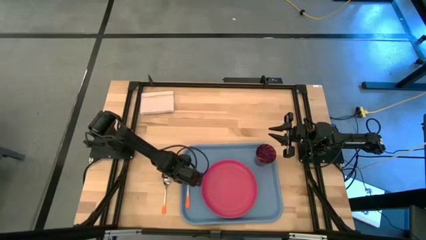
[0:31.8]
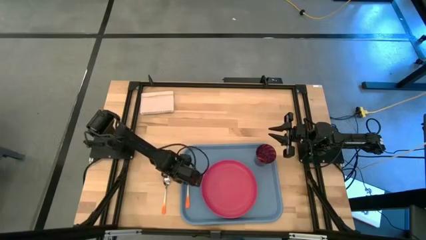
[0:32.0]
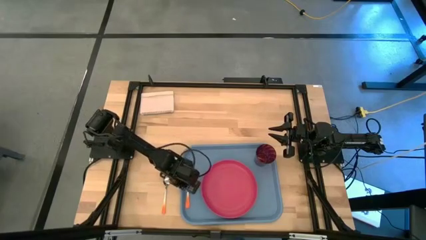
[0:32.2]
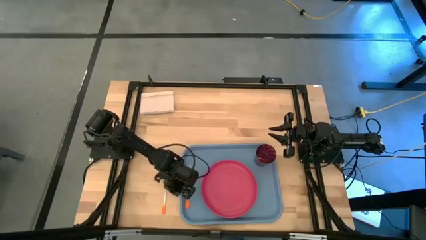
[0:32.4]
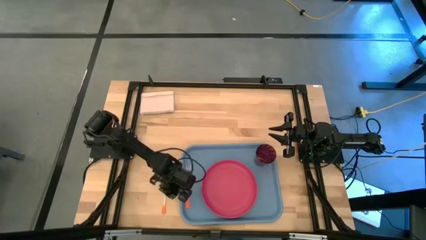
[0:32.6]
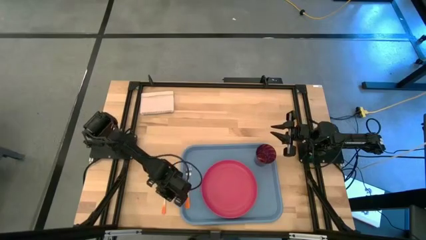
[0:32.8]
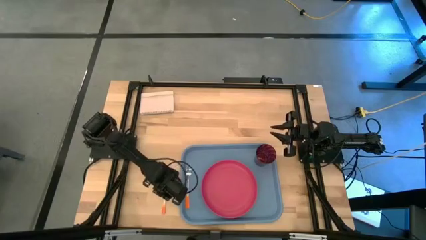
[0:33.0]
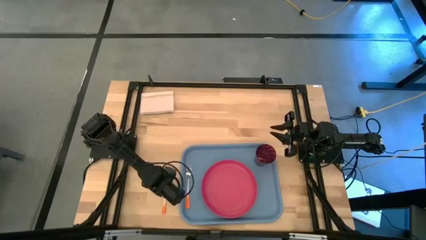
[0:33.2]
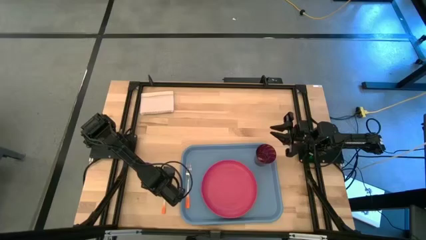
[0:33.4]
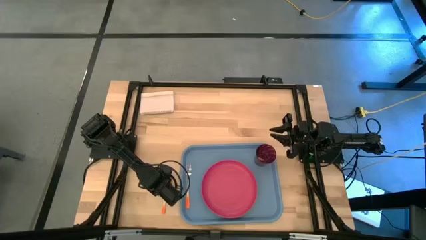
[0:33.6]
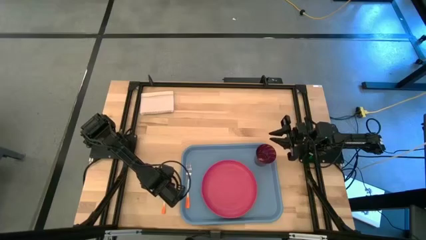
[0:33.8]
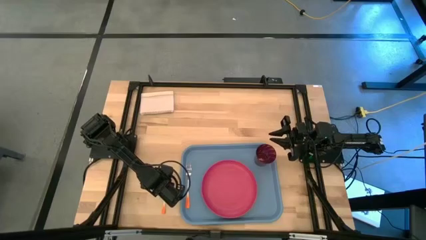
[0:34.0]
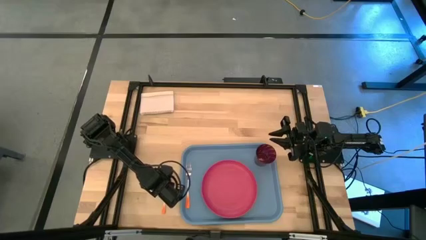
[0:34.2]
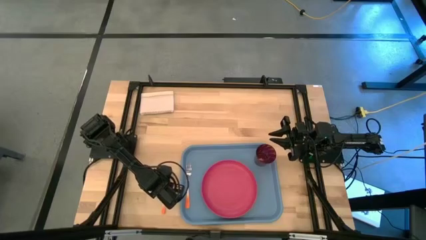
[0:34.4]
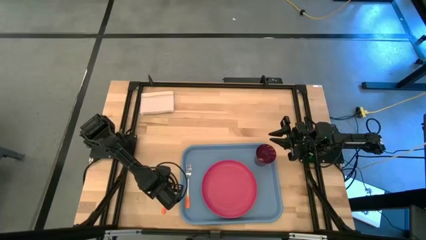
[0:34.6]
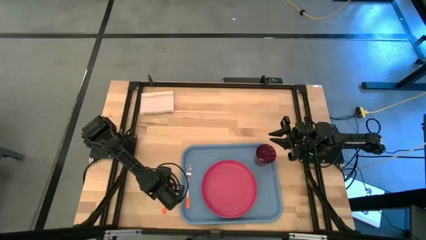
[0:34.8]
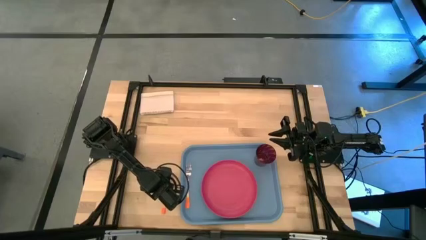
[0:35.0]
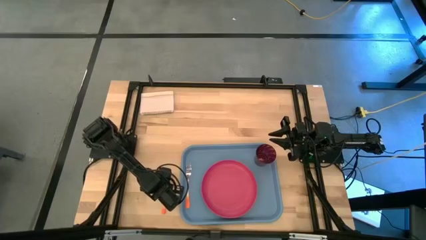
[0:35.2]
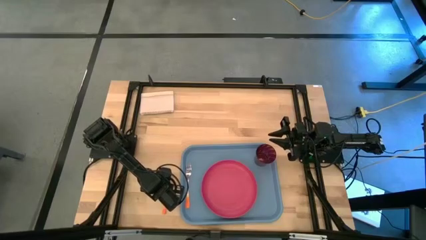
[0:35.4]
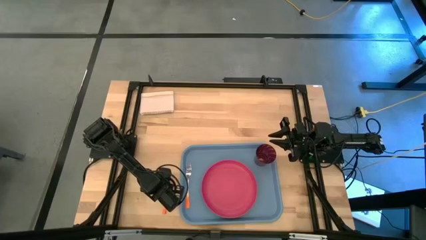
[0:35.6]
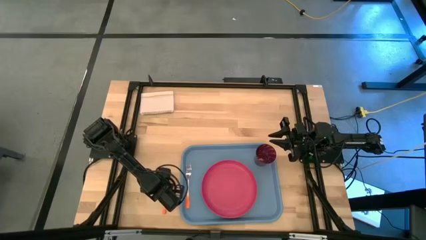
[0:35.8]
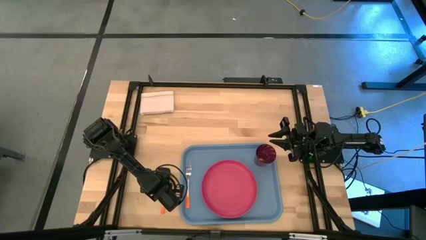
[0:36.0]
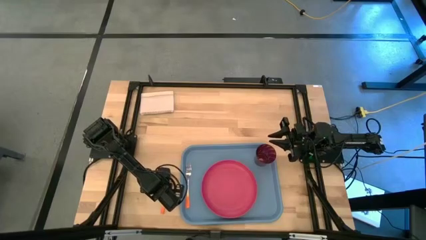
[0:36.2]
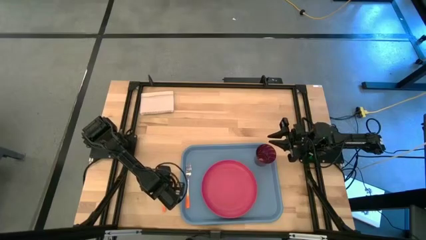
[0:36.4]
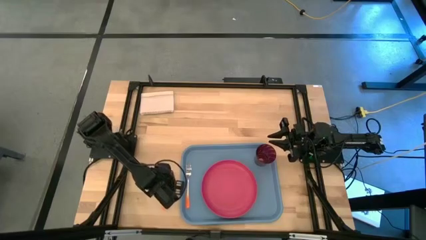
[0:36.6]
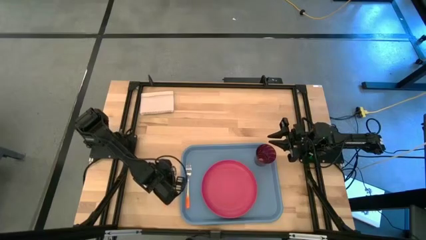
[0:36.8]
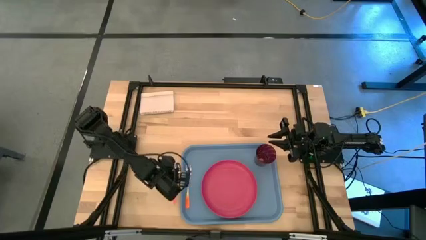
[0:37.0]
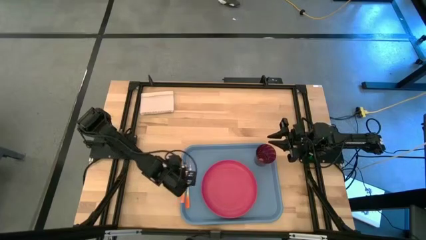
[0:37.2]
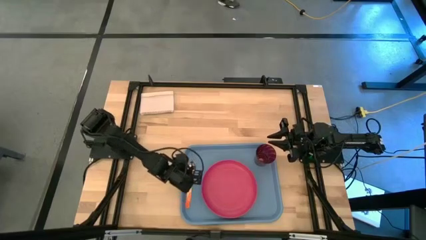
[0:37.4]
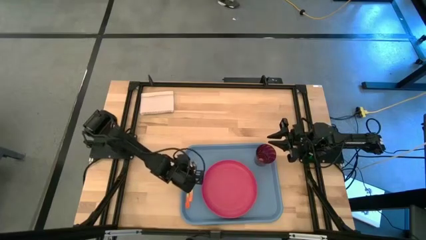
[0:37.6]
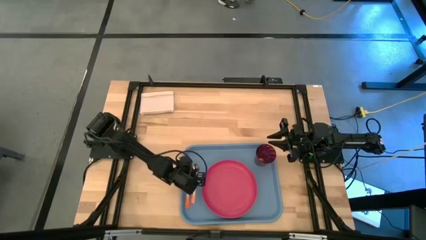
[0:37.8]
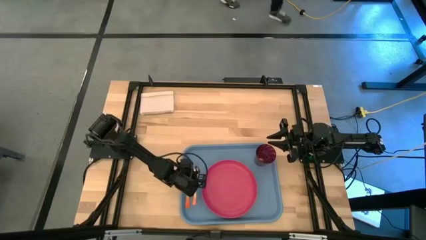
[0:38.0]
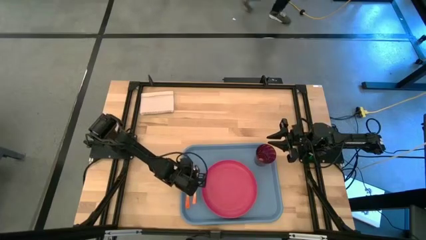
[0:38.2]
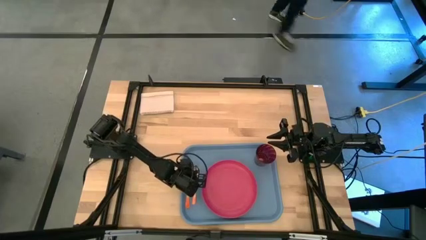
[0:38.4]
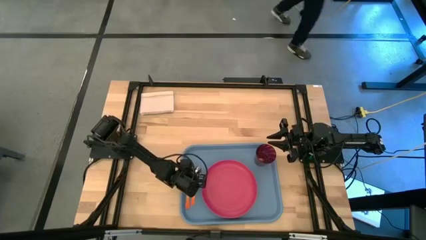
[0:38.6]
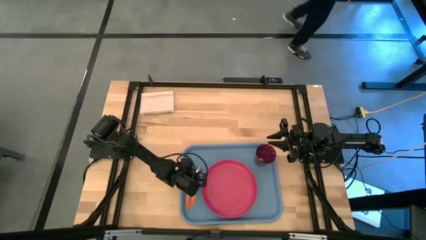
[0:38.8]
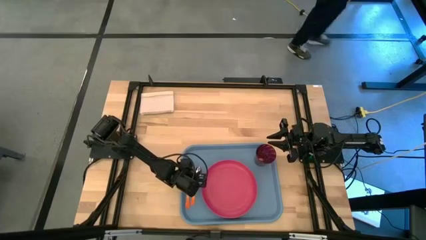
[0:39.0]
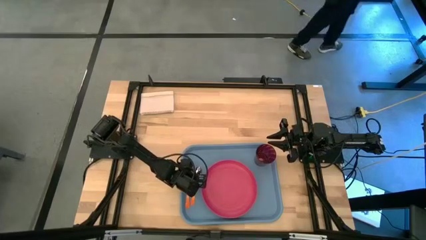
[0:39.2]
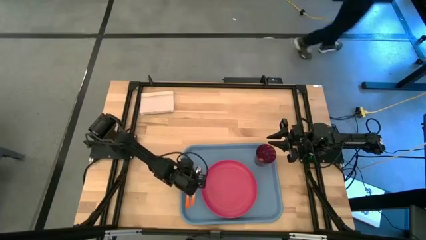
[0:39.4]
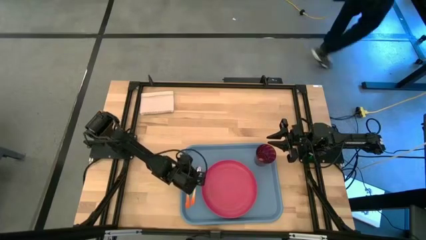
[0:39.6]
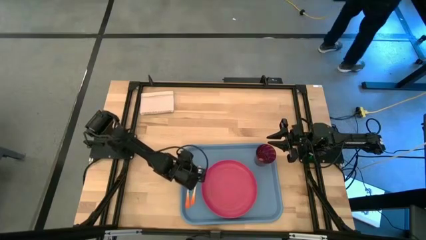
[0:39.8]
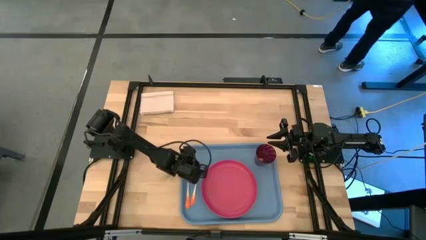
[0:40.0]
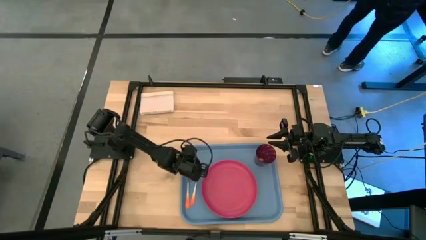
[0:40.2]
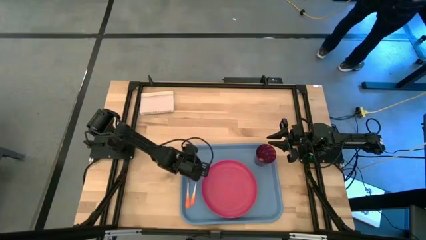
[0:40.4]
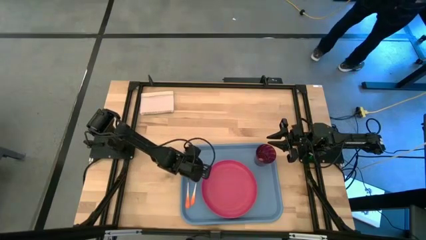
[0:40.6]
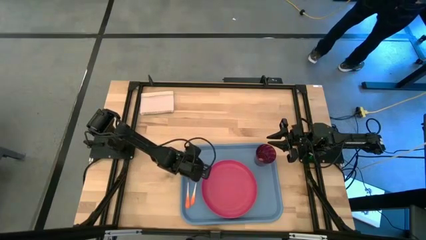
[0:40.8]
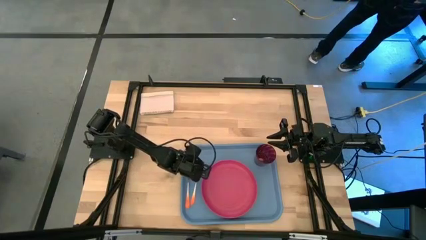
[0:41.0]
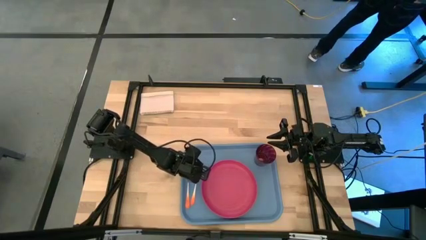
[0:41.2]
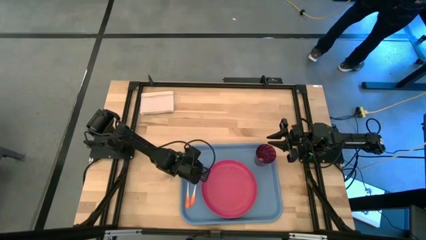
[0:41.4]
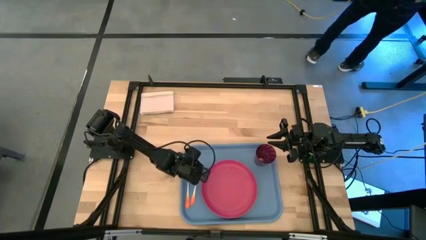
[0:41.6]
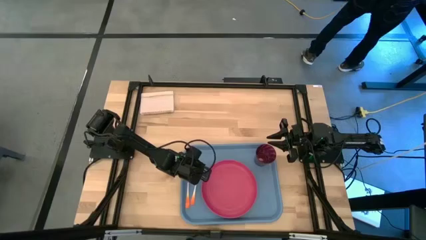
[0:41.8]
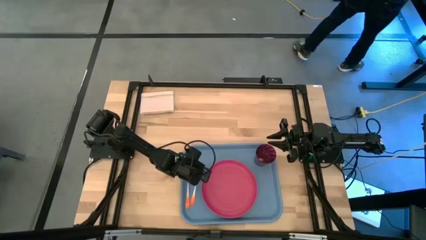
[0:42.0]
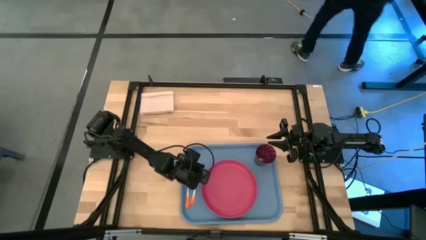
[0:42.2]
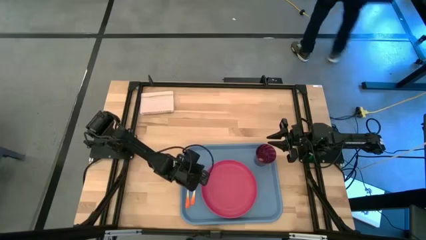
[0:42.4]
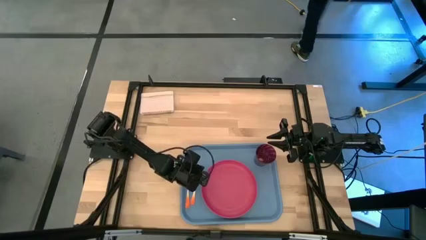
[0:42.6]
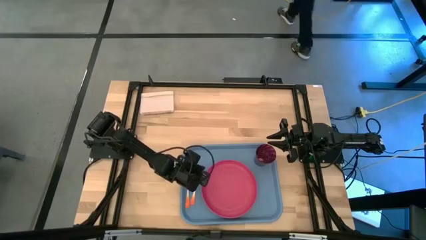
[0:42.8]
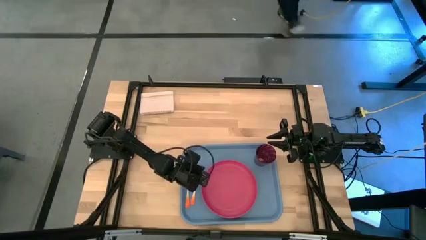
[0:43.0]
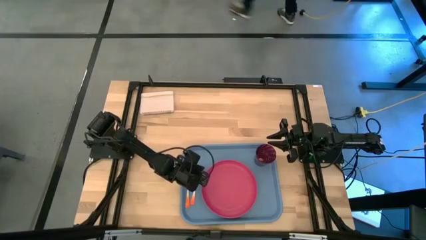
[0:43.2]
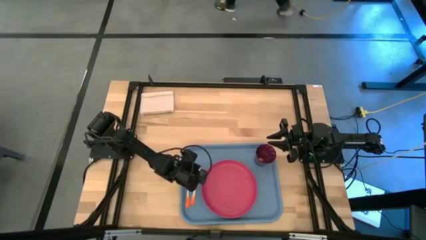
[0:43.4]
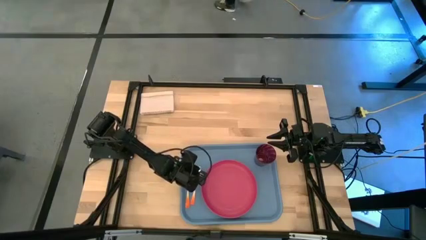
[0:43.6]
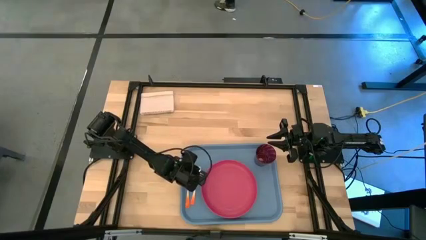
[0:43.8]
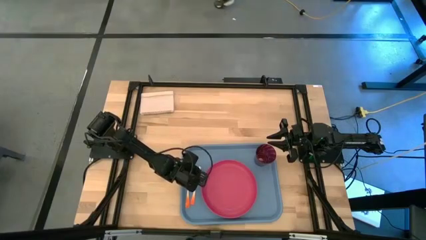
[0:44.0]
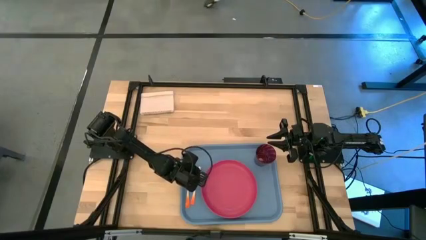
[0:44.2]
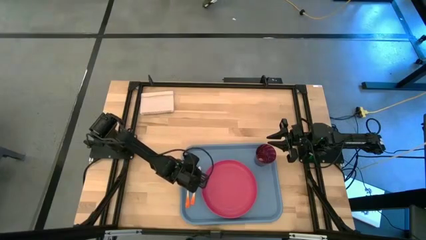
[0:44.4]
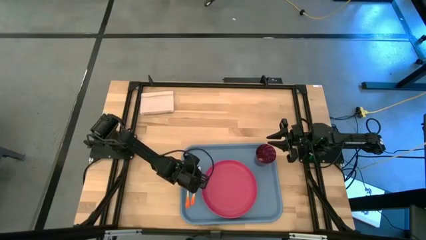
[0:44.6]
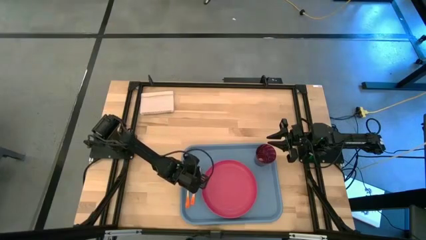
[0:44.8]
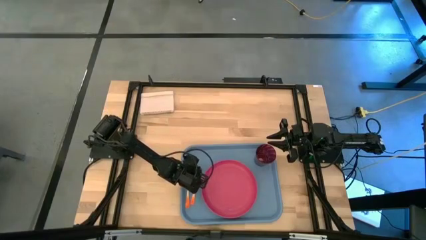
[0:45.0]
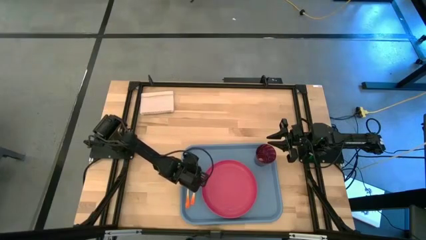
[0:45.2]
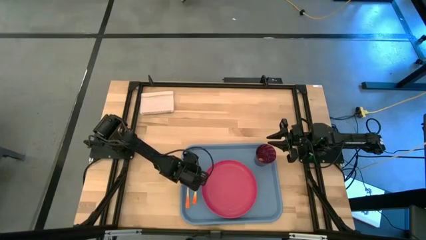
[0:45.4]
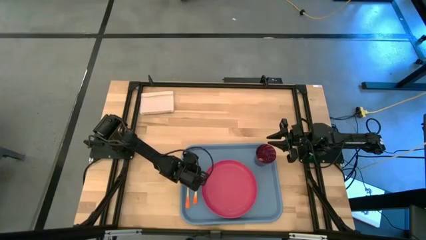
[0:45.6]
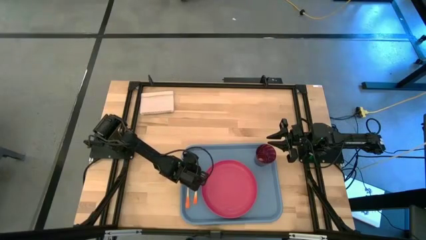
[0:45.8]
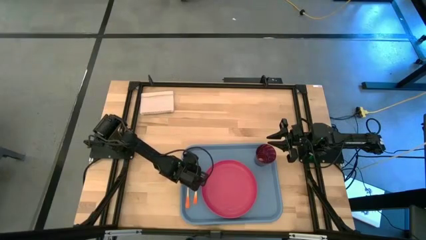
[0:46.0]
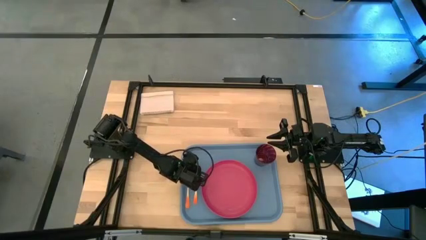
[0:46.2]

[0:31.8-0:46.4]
Task: Pick and place plate/cup/fork/spoon on tray
Put the orange and silver spoon on the blue tray on the right side of the orange and silver fork

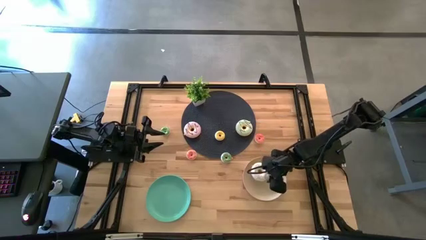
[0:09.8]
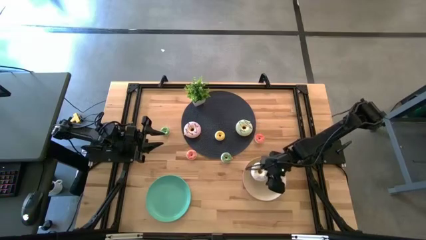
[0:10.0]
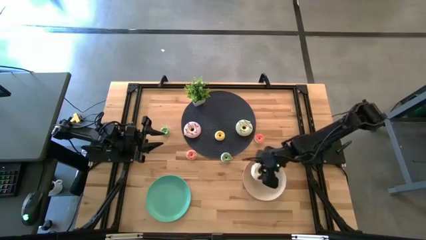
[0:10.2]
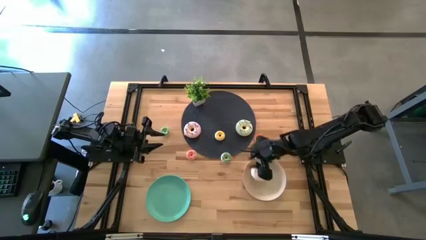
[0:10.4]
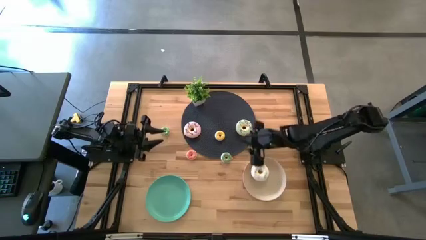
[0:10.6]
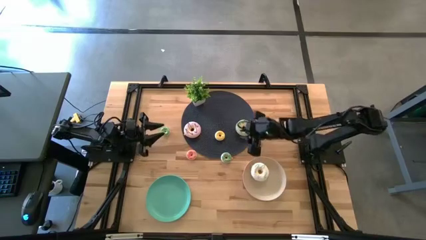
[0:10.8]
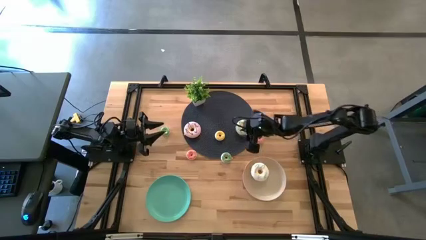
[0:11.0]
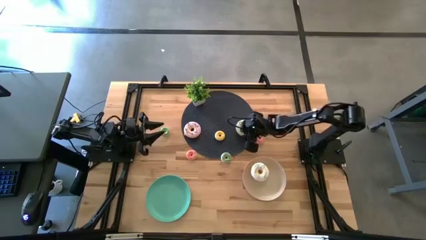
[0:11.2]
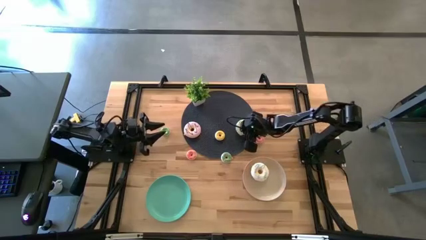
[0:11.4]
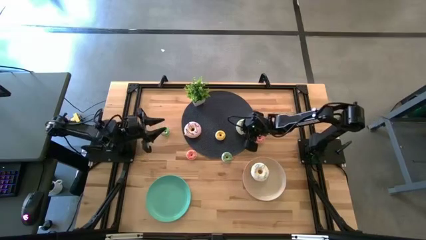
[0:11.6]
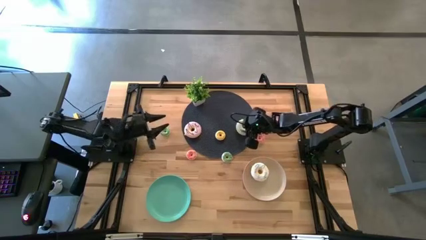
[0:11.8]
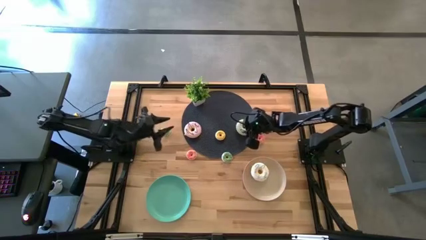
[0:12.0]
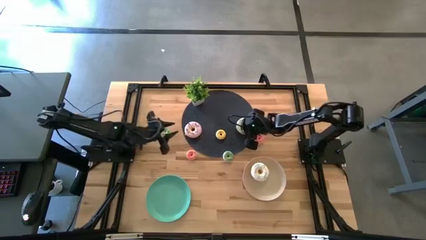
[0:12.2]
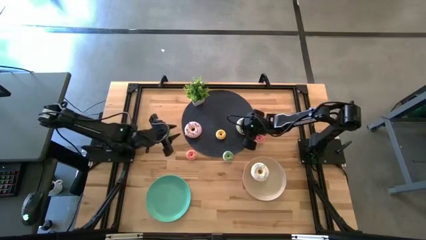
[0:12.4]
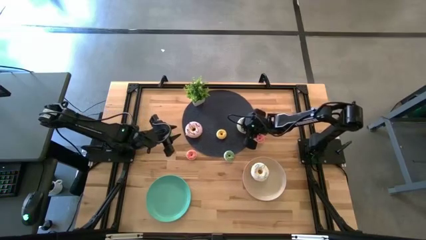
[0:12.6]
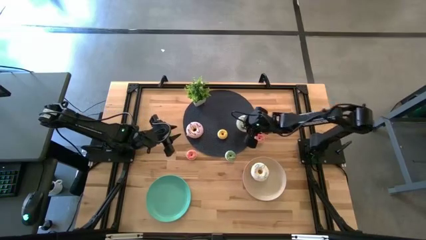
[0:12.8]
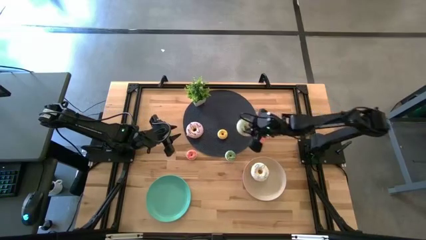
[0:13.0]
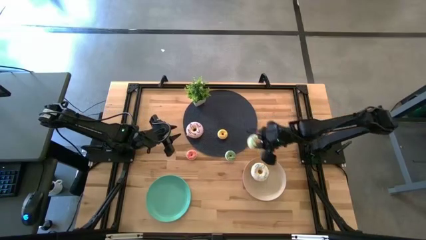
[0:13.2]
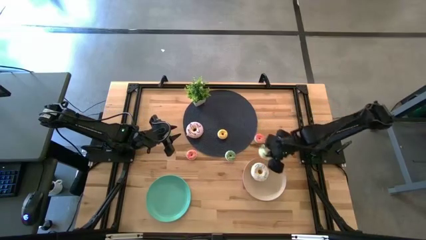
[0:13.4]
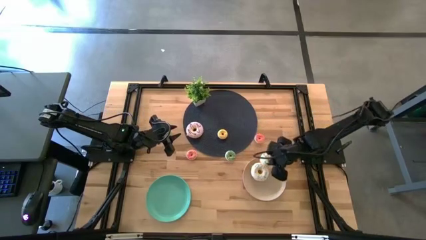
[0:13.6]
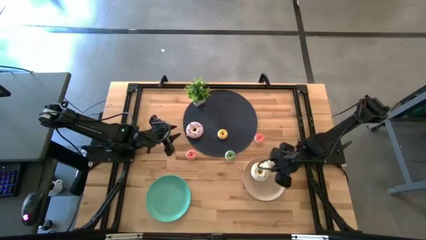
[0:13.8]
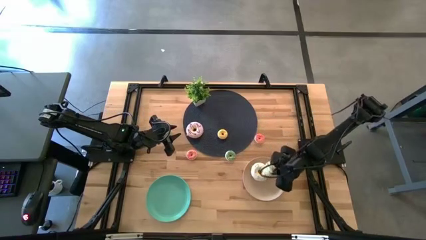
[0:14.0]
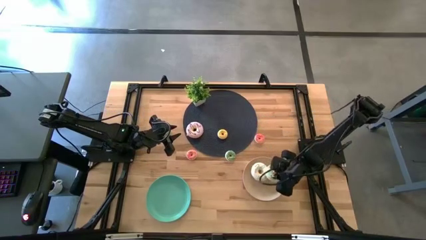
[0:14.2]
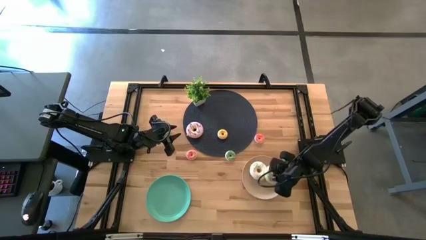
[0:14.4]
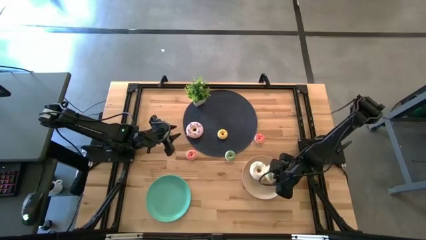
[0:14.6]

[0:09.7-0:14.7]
Task: Pick & Place donuts
Put the large light blue donut on the brown plate
